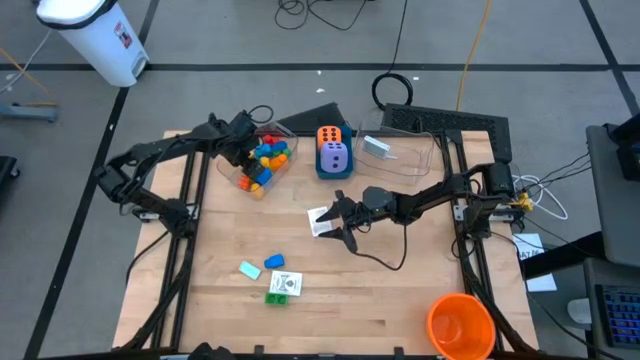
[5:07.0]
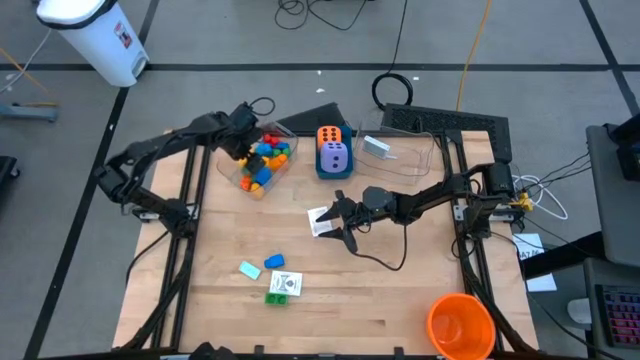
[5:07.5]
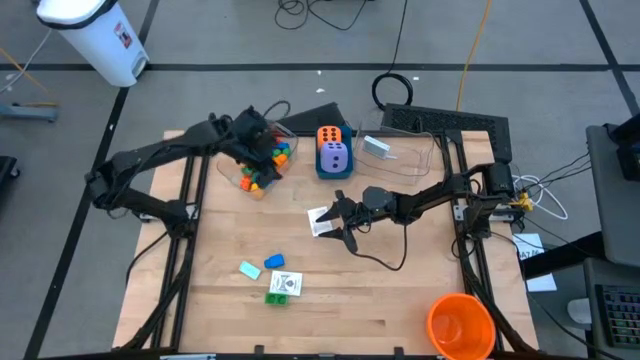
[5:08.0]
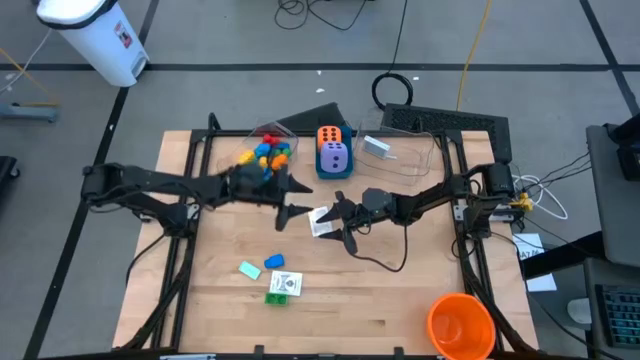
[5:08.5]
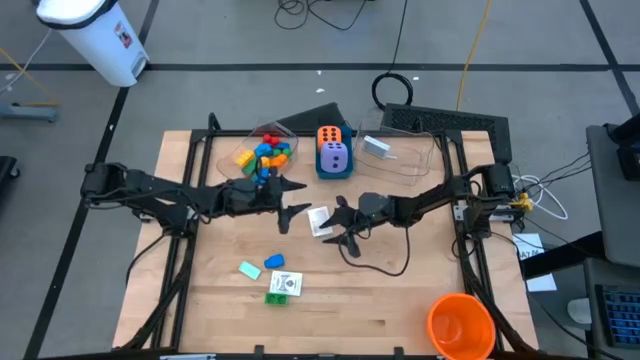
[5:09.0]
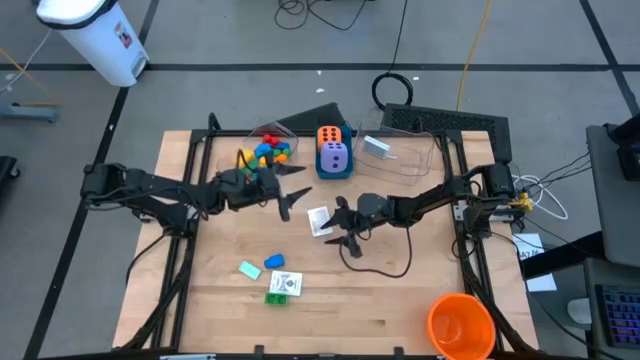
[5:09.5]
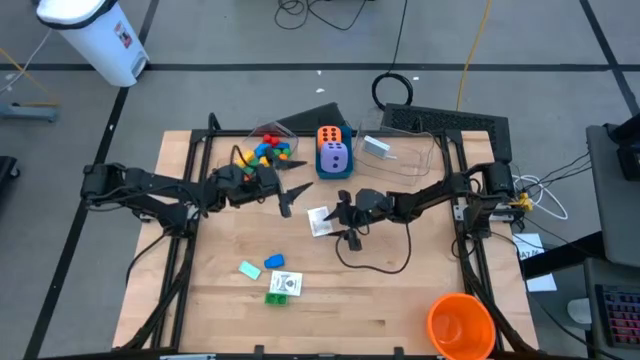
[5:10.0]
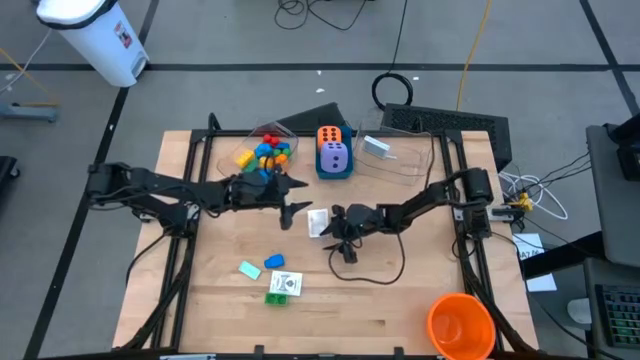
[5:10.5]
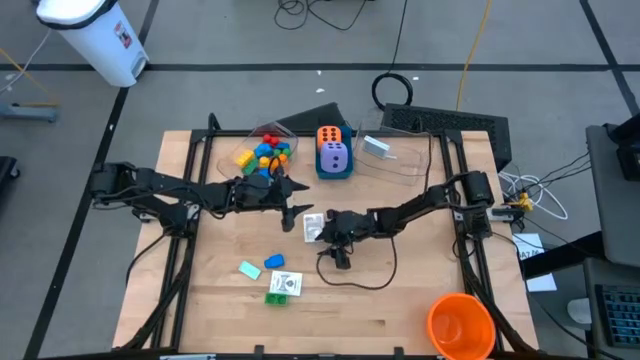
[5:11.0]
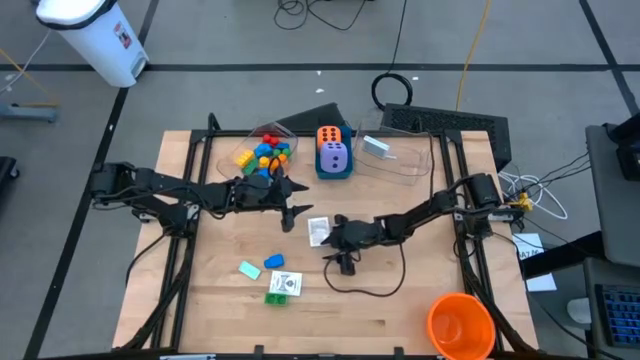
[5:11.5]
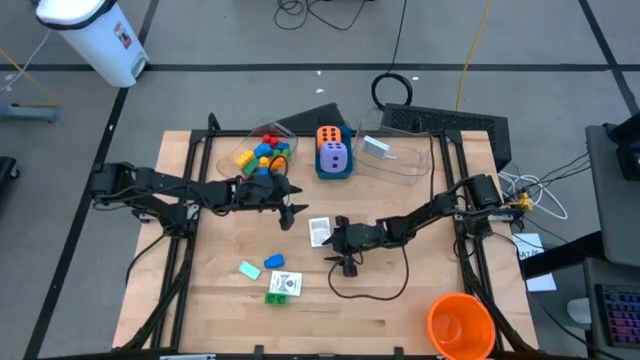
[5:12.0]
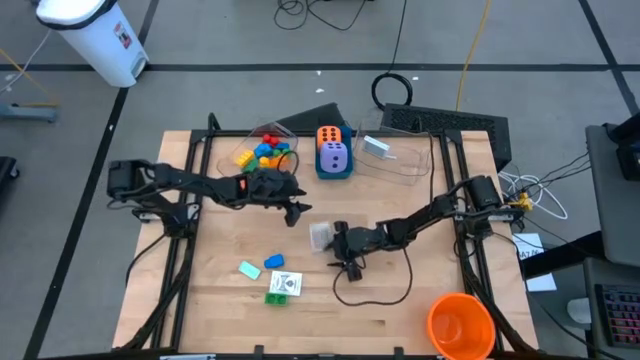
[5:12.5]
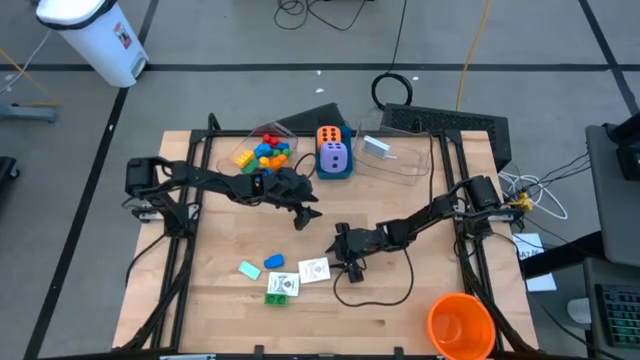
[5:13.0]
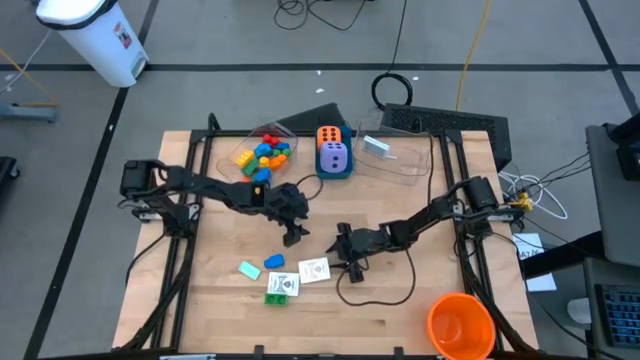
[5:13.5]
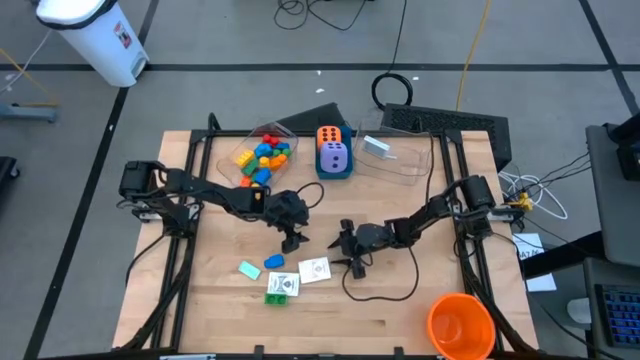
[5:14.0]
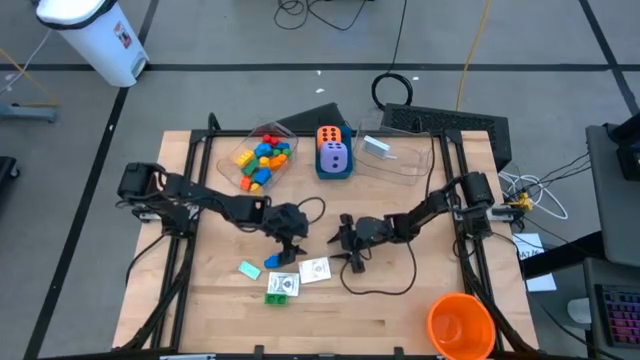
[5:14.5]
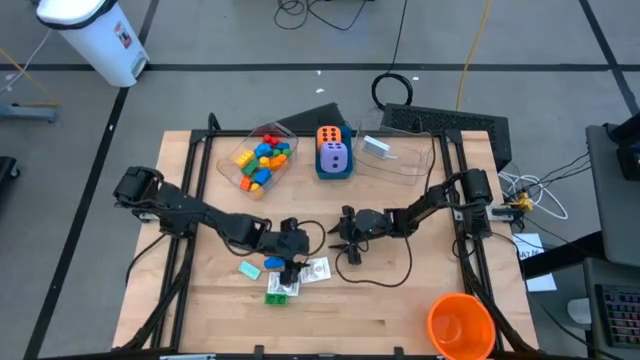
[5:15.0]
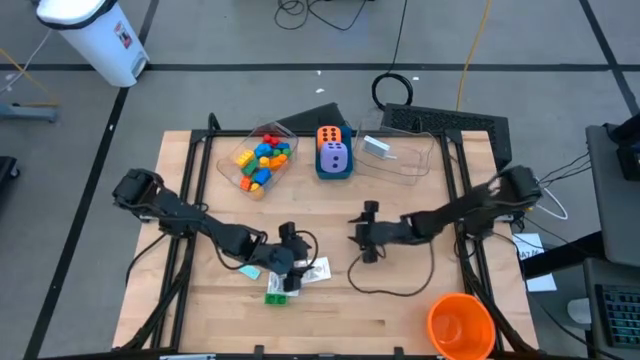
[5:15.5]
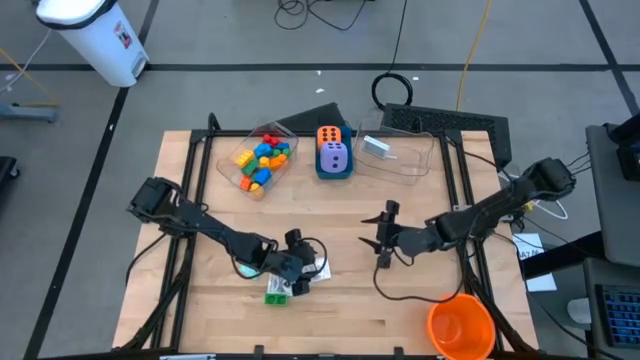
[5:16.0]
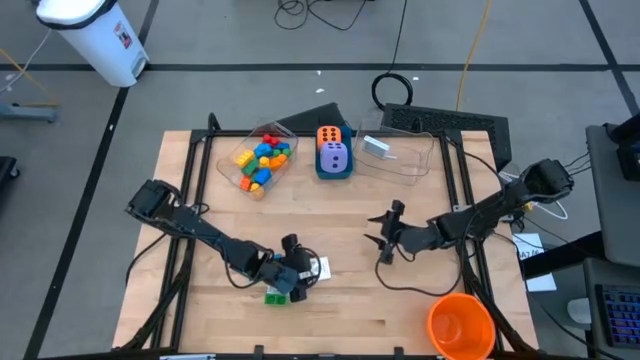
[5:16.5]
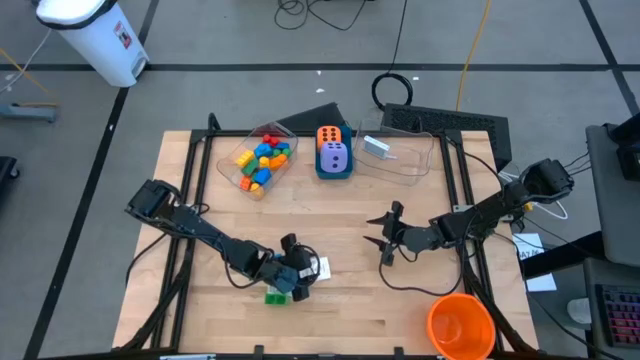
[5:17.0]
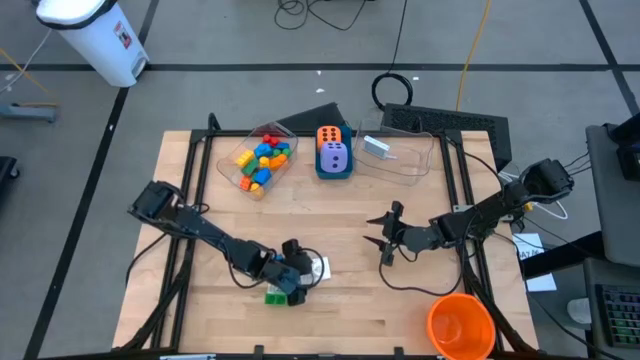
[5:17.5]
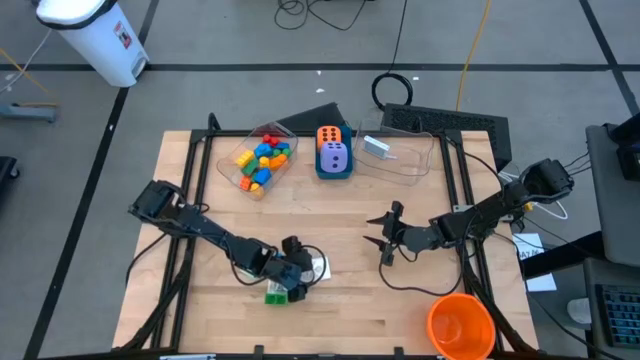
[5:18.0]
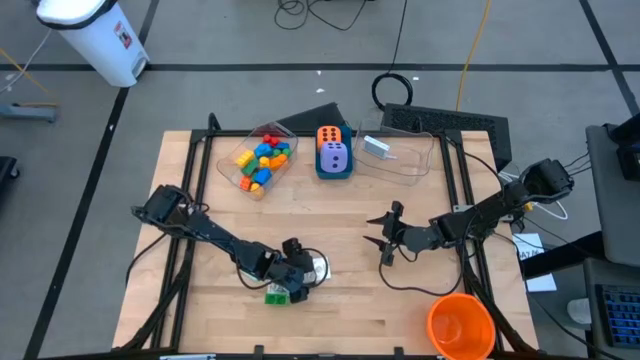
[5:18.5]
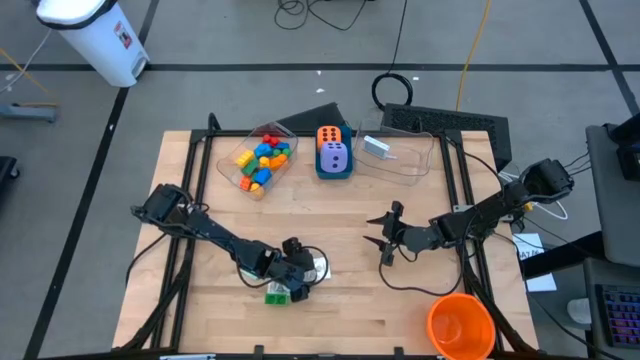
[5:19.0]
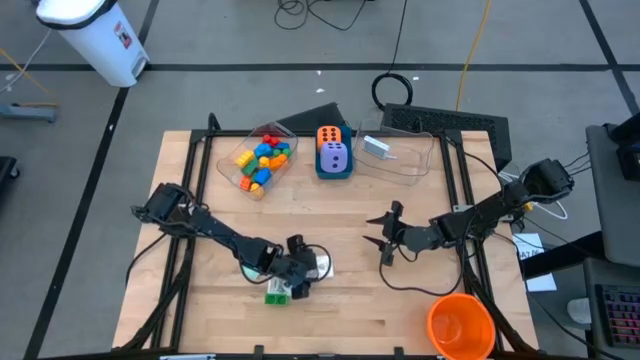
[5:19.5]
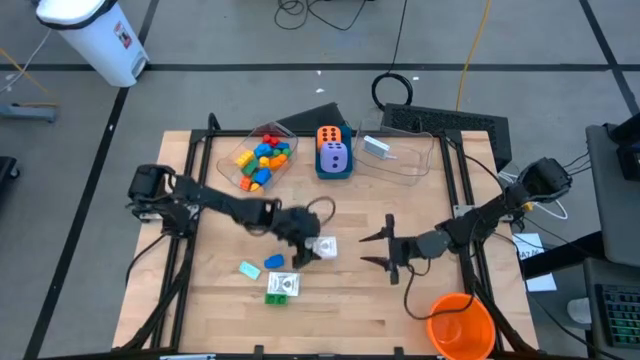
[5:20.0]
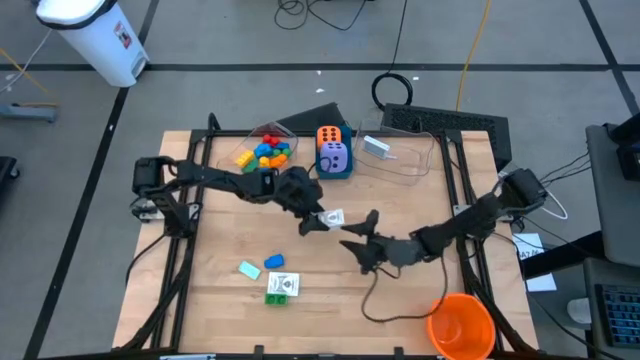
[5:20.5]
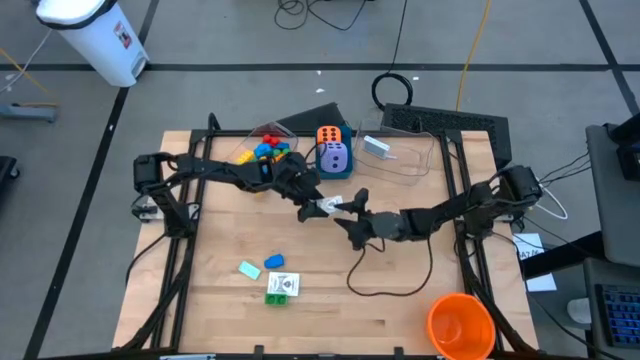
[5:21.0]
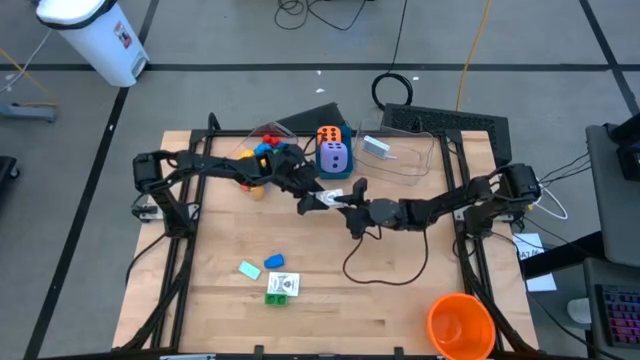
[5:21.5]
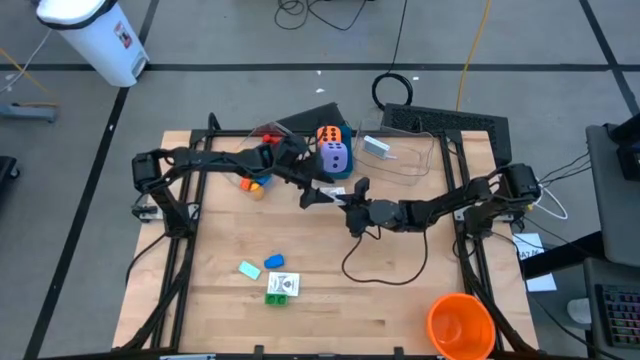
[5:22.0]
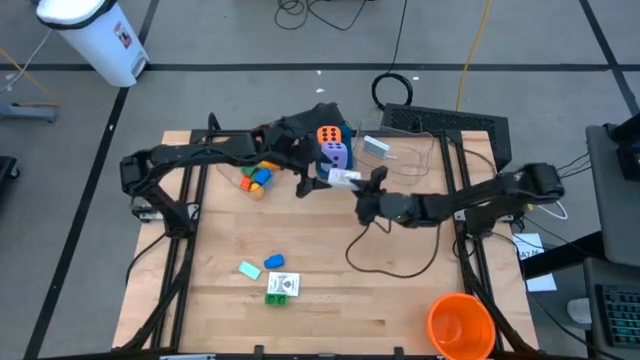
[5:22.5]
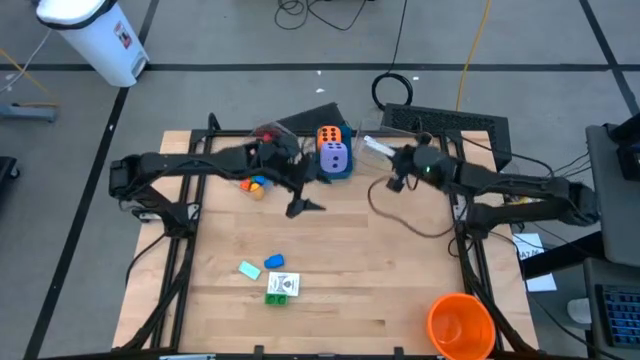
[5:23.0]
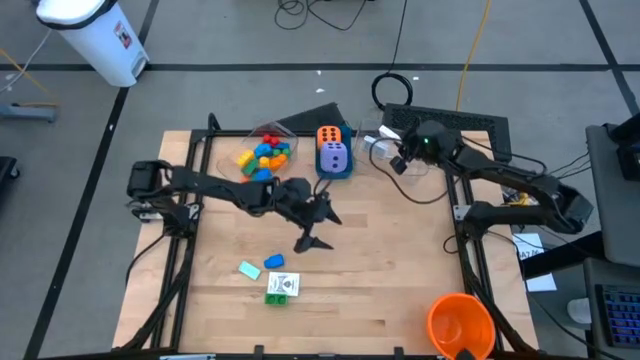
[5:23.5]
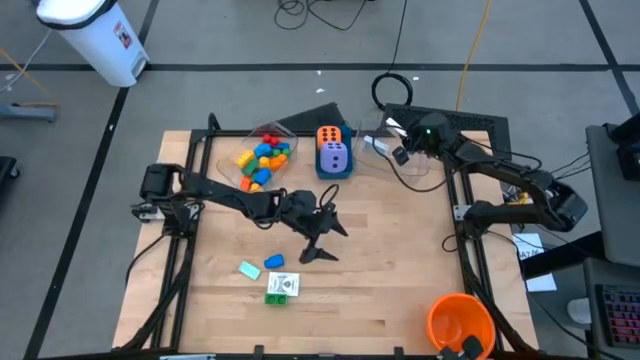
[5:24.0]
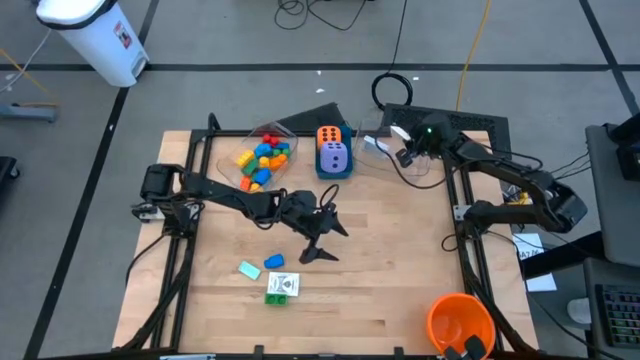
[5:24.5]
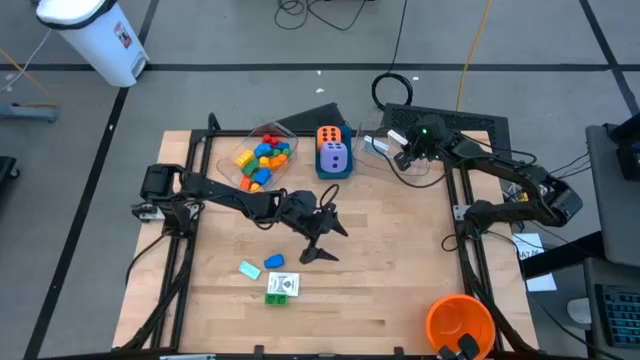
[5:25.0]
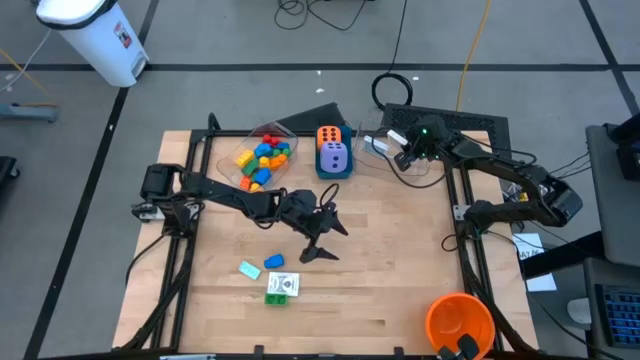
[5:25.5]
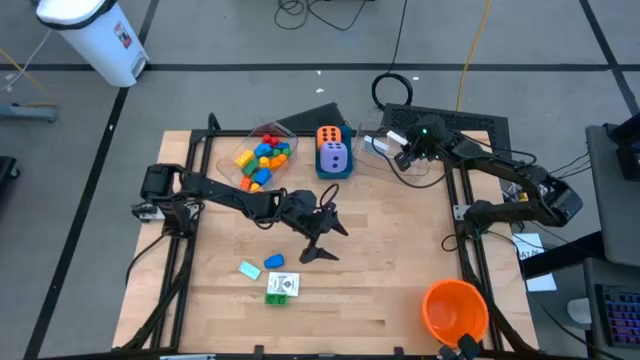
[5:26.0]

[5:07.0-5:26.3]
Task: Pick & Place Toys
Put the brown playing cards into the right transparent bin

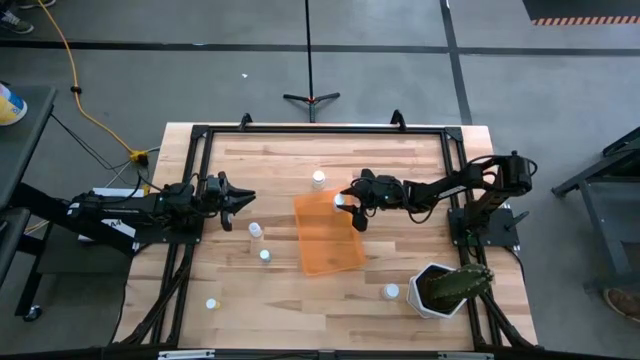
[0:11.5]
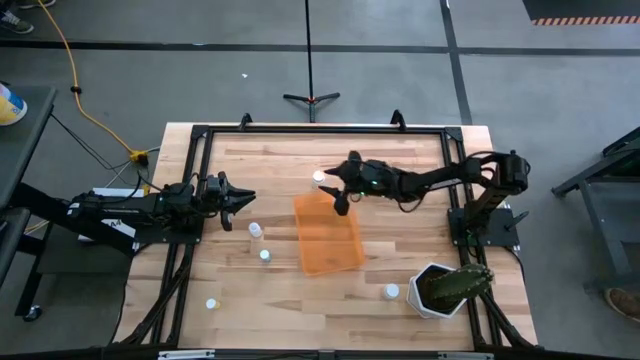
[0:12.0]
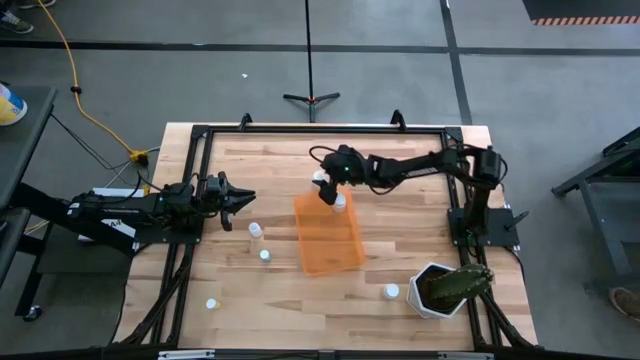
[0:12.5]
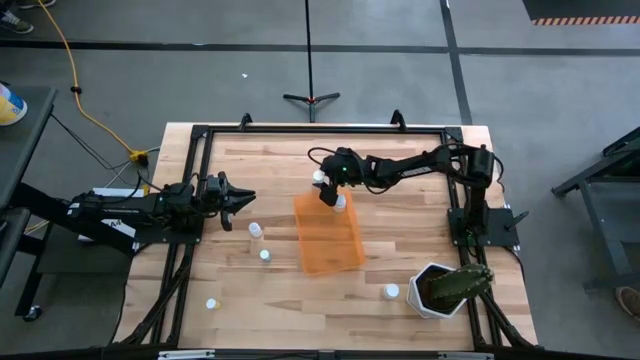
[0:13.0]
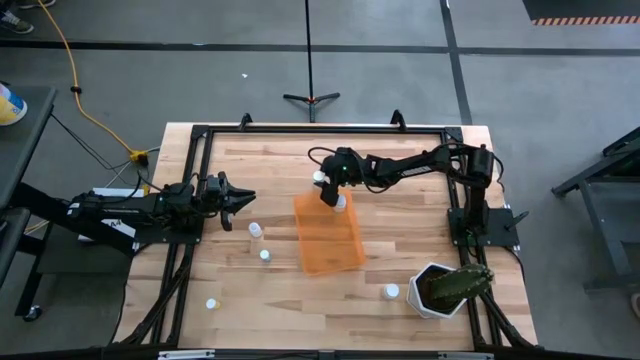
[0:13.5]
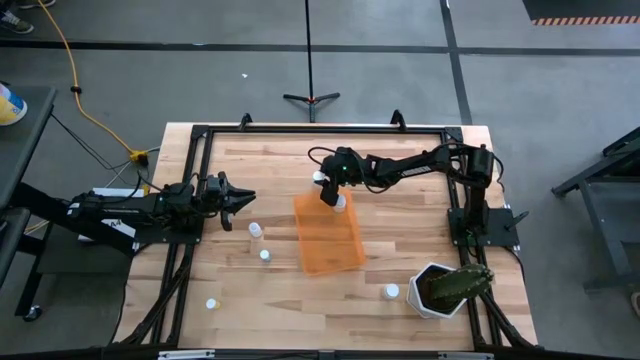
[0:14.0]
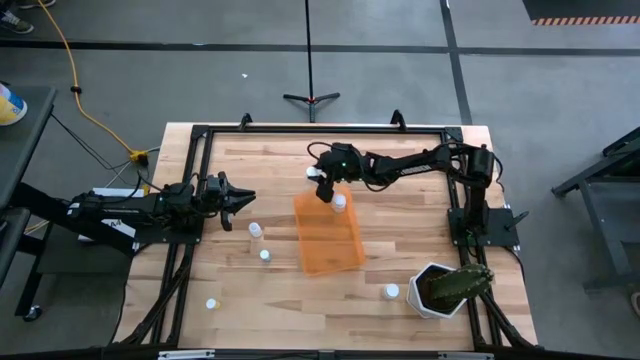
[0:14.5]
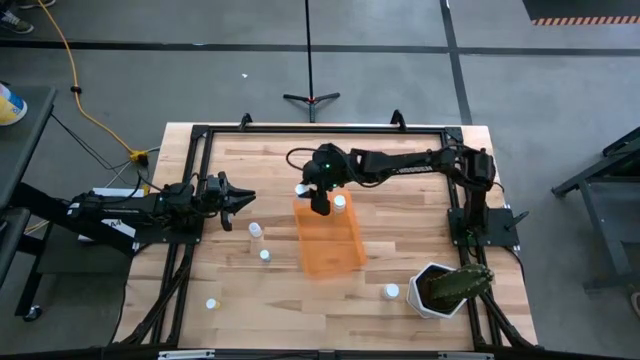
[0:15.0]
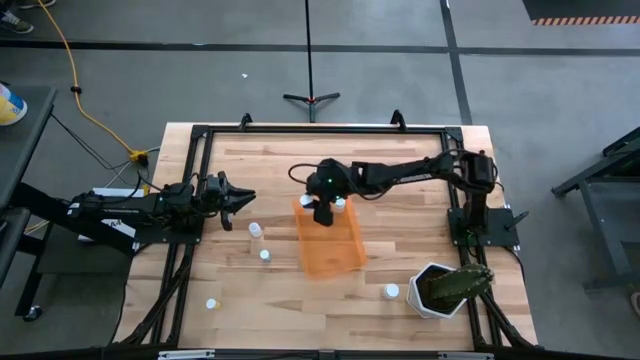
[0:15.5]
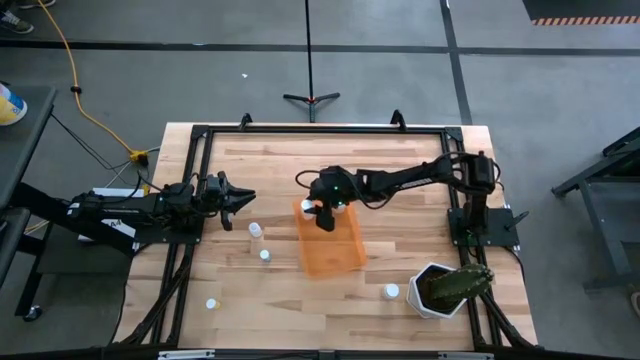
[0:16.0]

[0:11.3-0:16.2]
Task: Pick and place pill bottles into a basket
Put the top large white pill bottle into the bin
